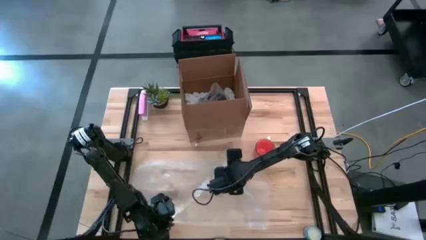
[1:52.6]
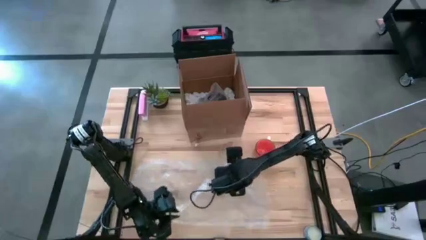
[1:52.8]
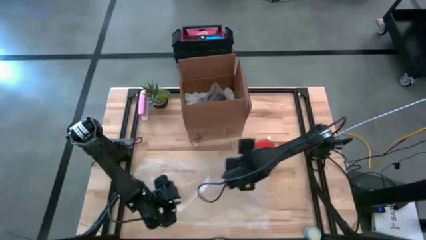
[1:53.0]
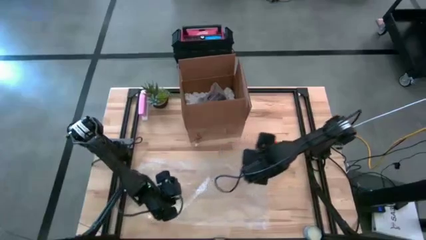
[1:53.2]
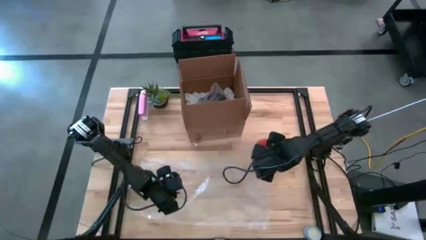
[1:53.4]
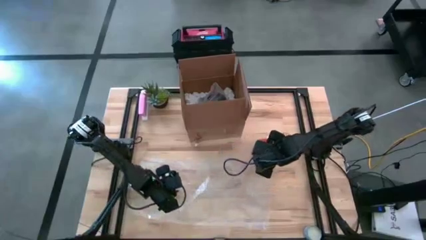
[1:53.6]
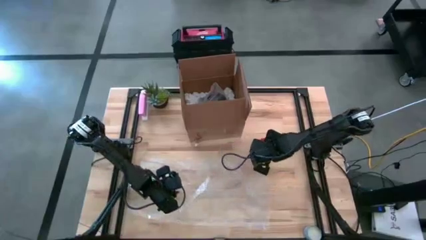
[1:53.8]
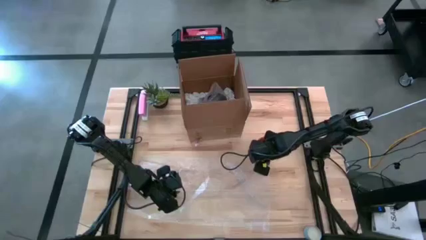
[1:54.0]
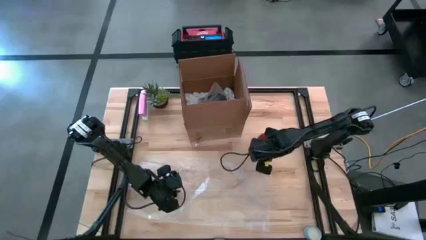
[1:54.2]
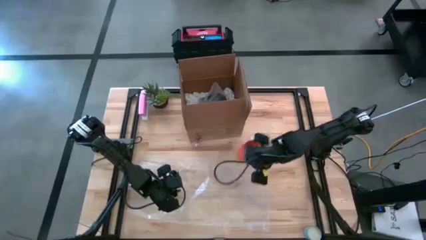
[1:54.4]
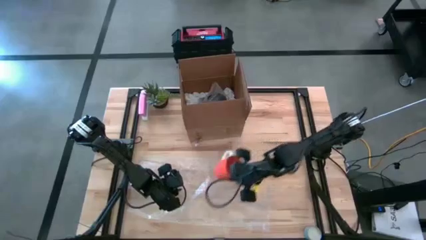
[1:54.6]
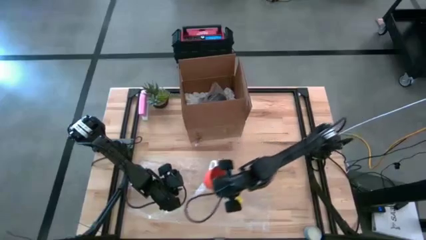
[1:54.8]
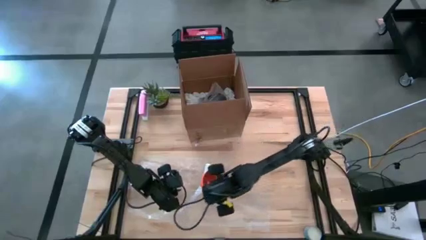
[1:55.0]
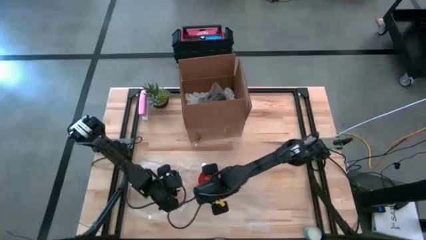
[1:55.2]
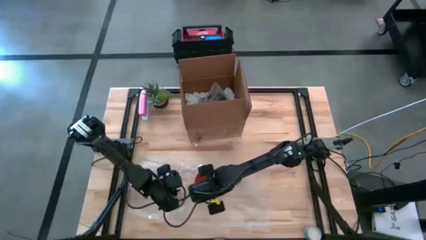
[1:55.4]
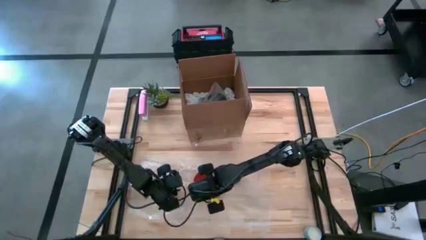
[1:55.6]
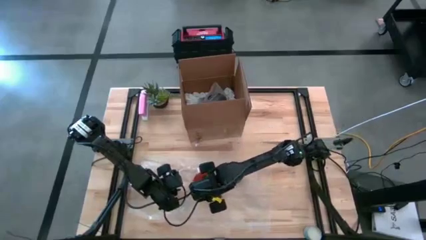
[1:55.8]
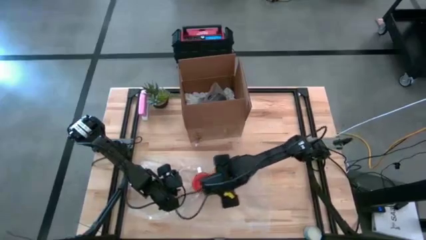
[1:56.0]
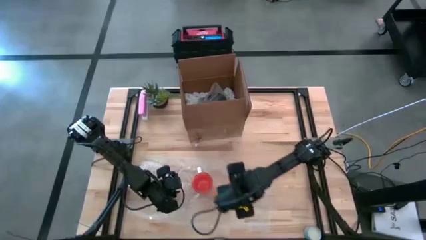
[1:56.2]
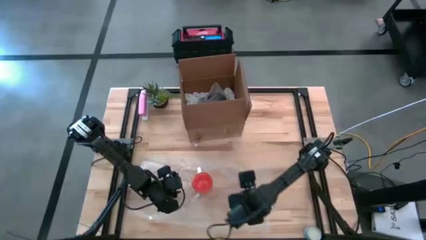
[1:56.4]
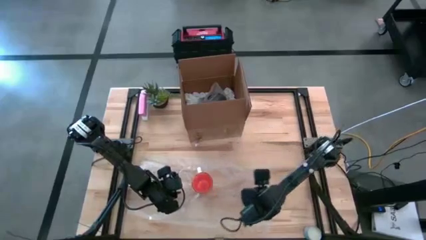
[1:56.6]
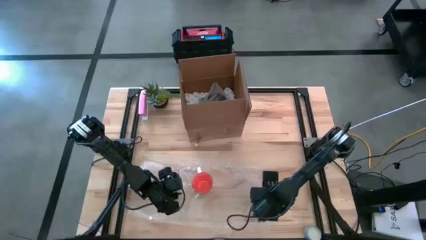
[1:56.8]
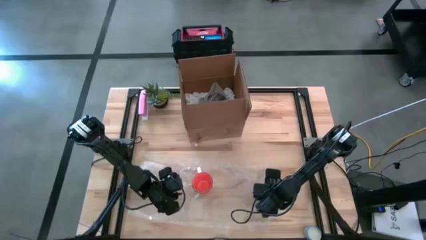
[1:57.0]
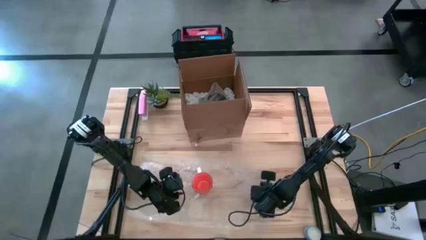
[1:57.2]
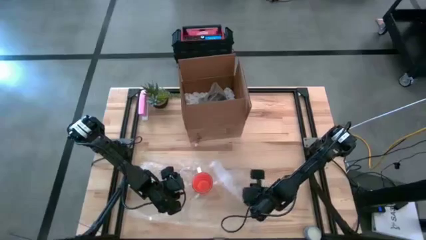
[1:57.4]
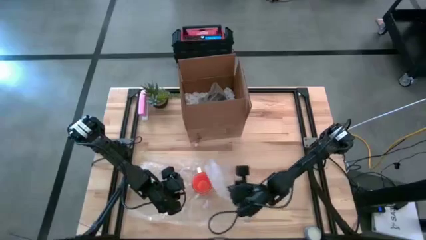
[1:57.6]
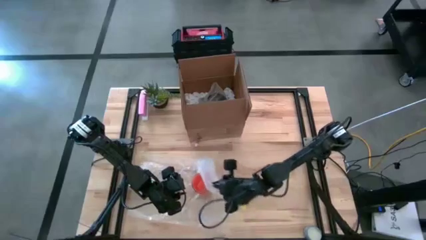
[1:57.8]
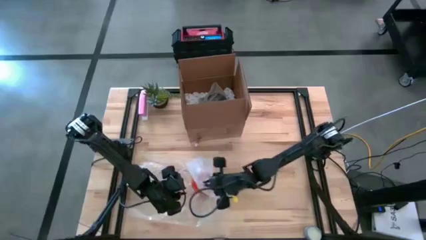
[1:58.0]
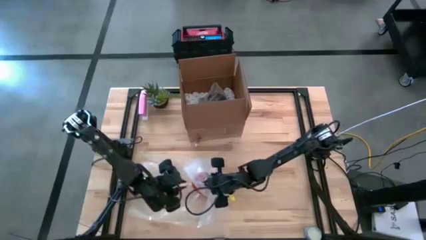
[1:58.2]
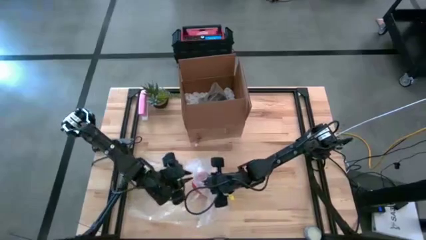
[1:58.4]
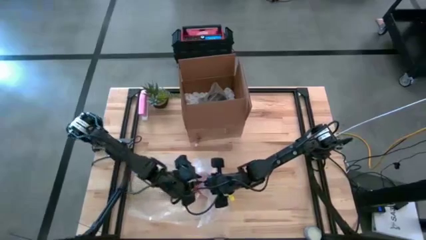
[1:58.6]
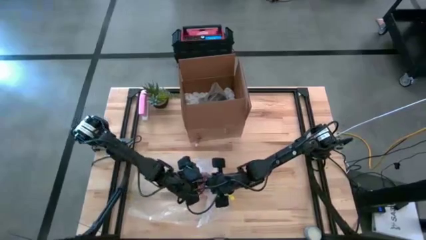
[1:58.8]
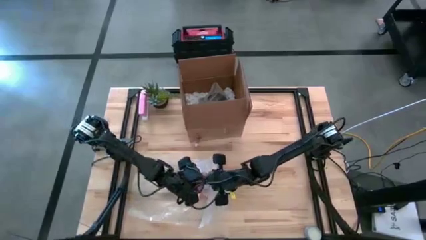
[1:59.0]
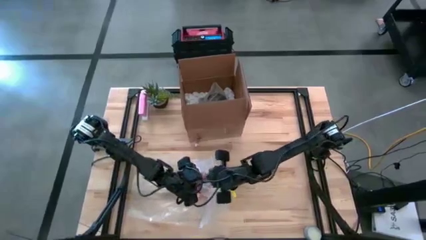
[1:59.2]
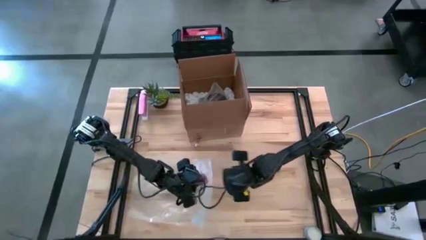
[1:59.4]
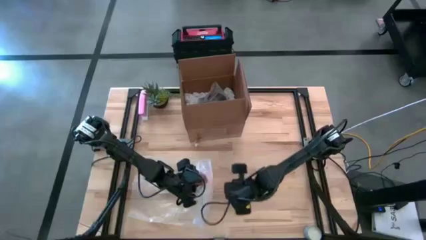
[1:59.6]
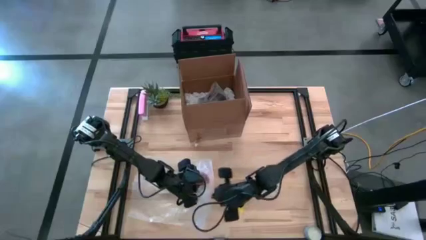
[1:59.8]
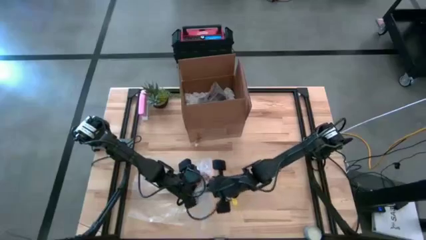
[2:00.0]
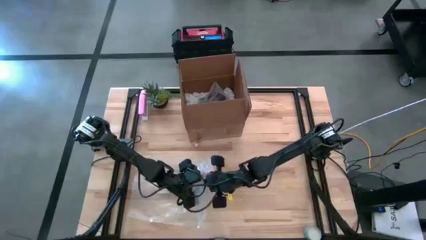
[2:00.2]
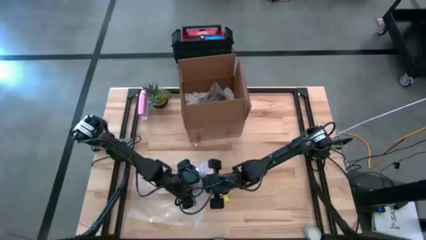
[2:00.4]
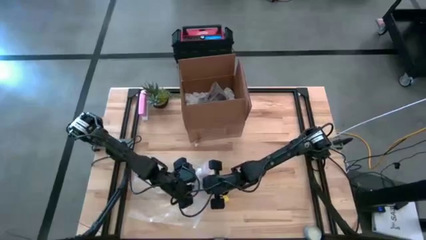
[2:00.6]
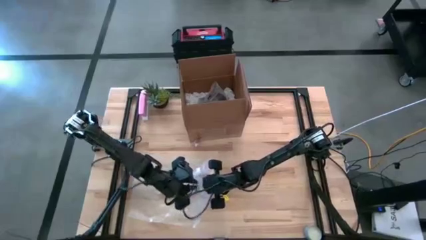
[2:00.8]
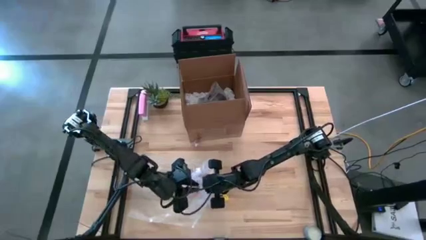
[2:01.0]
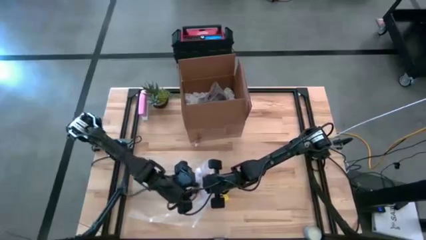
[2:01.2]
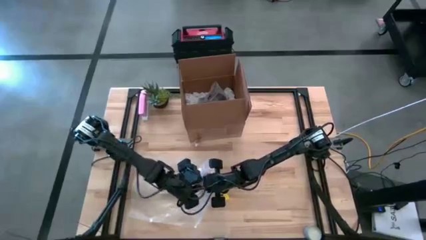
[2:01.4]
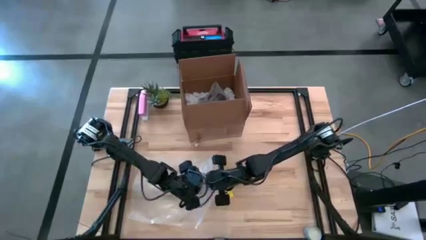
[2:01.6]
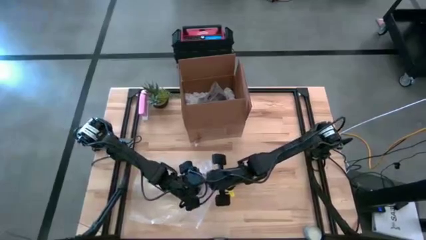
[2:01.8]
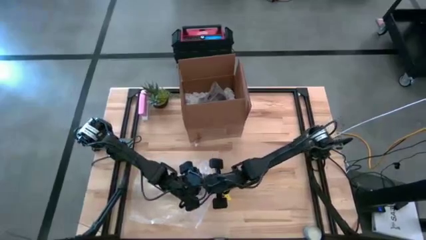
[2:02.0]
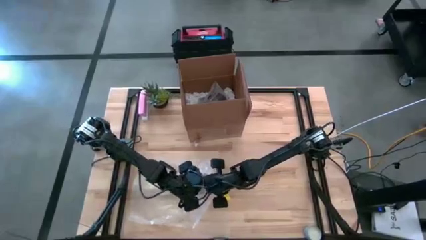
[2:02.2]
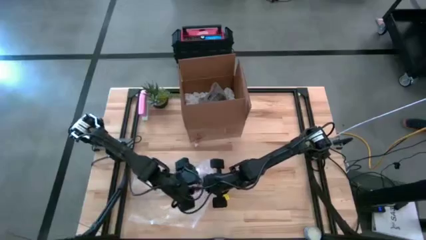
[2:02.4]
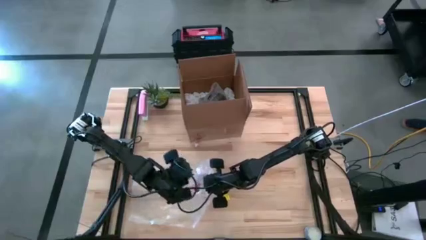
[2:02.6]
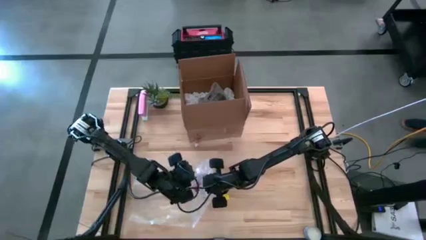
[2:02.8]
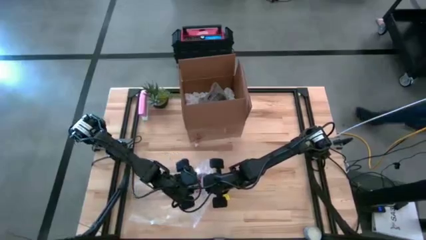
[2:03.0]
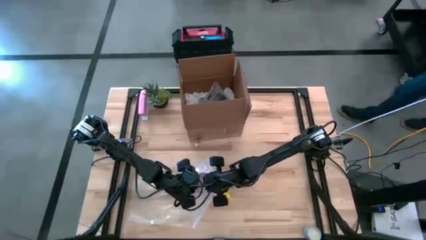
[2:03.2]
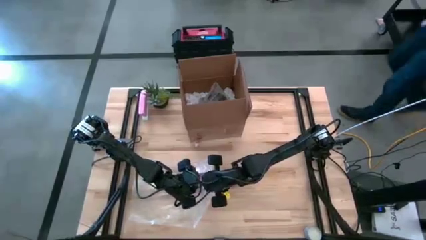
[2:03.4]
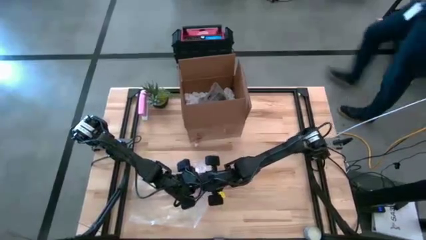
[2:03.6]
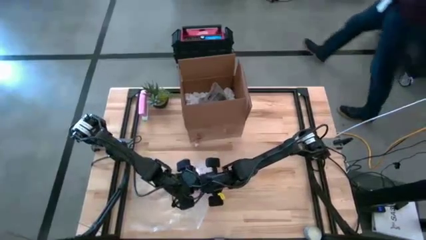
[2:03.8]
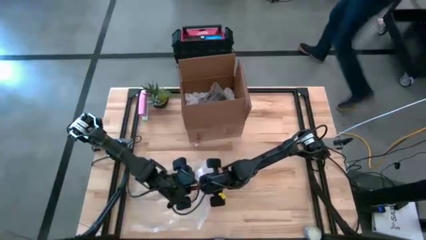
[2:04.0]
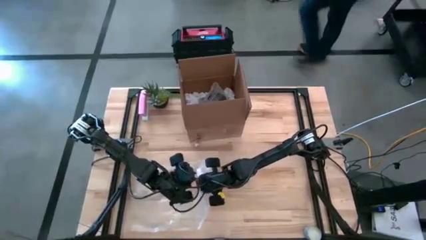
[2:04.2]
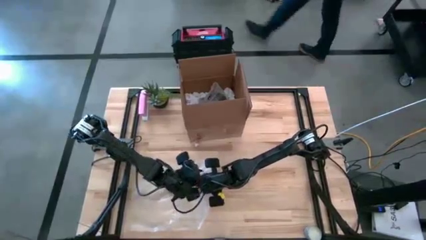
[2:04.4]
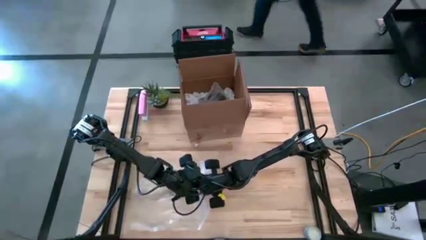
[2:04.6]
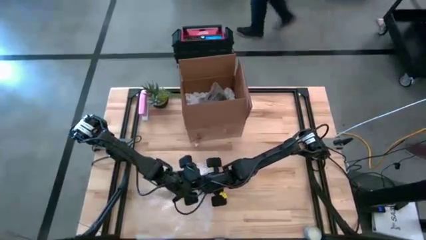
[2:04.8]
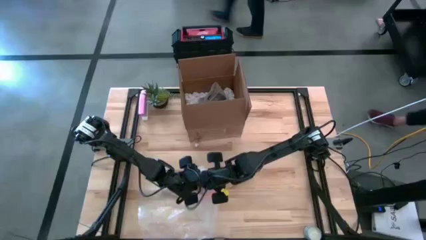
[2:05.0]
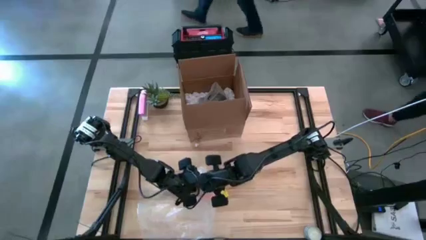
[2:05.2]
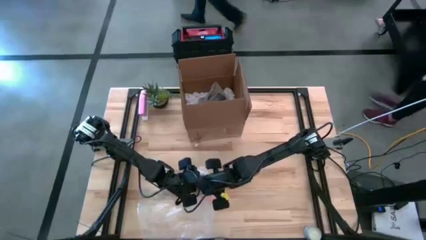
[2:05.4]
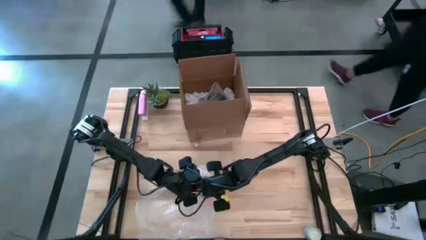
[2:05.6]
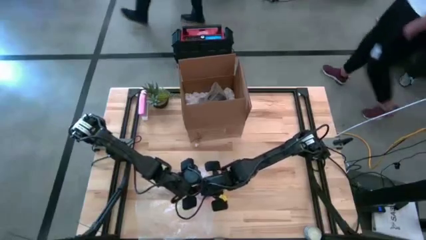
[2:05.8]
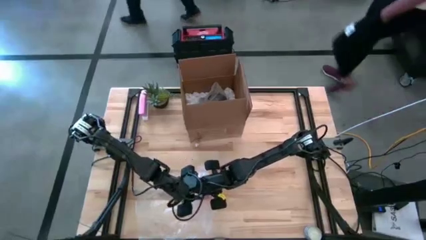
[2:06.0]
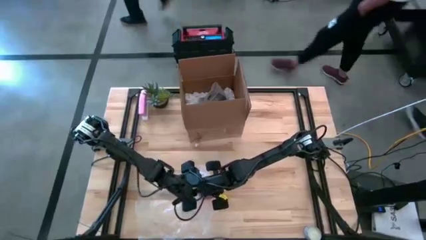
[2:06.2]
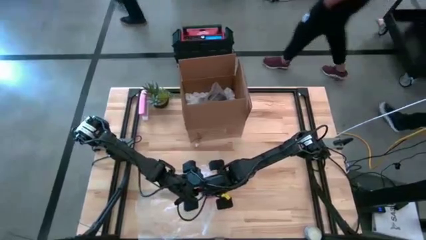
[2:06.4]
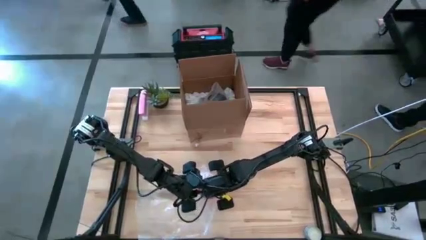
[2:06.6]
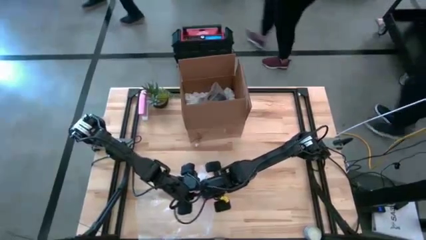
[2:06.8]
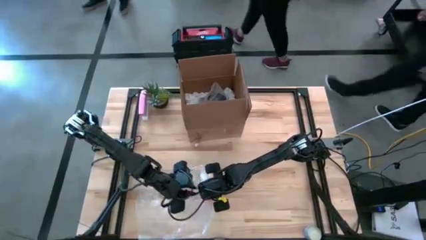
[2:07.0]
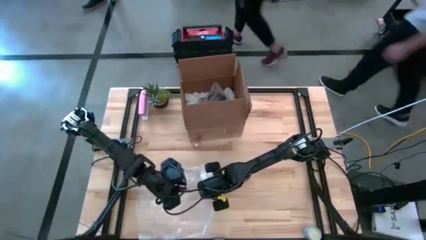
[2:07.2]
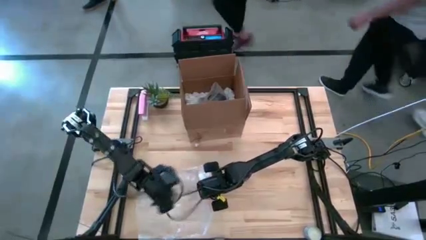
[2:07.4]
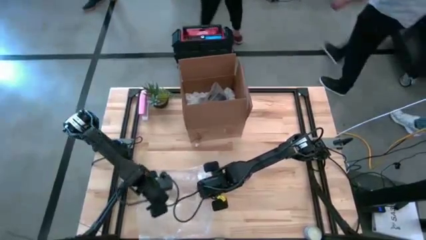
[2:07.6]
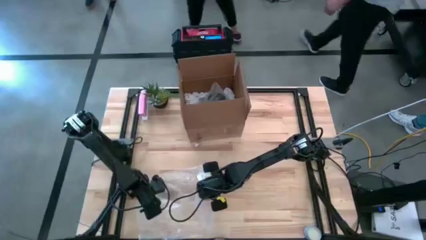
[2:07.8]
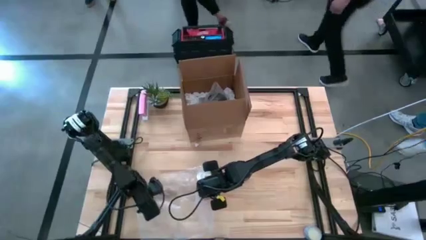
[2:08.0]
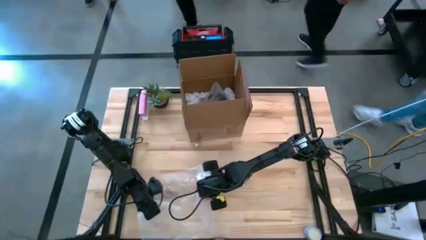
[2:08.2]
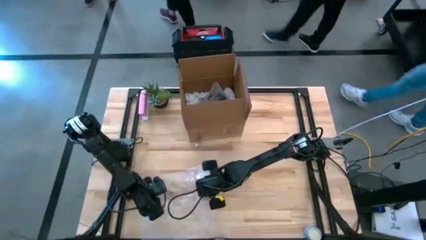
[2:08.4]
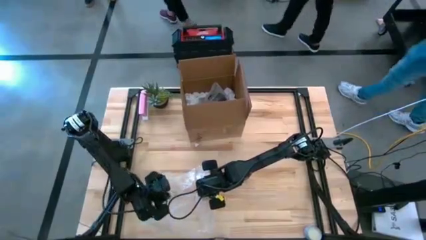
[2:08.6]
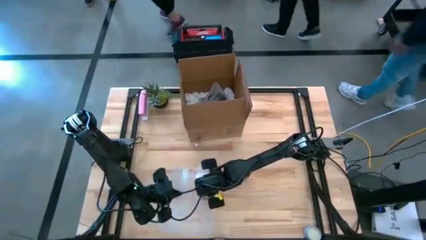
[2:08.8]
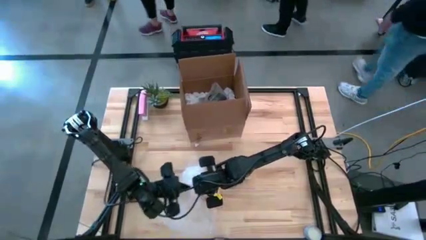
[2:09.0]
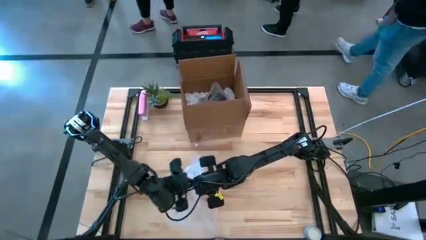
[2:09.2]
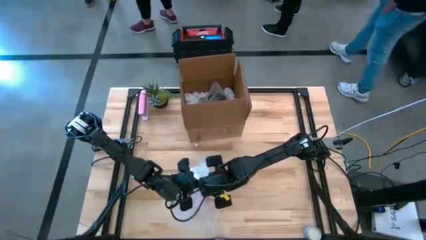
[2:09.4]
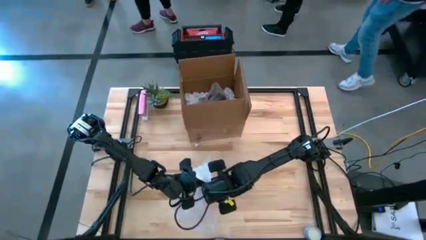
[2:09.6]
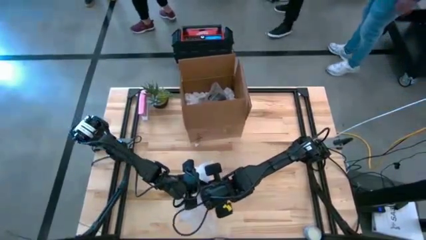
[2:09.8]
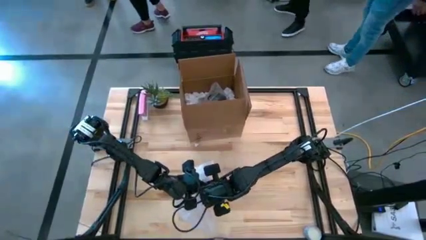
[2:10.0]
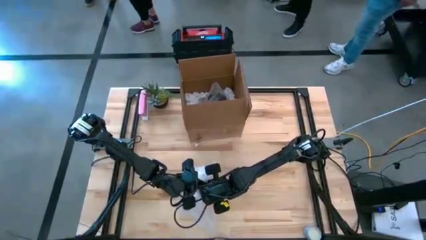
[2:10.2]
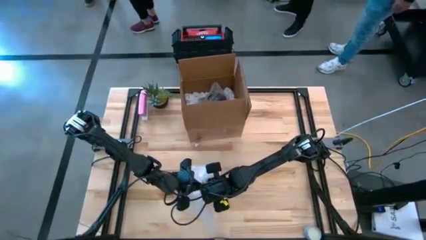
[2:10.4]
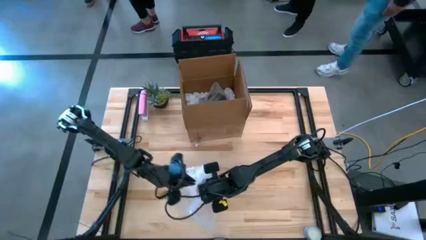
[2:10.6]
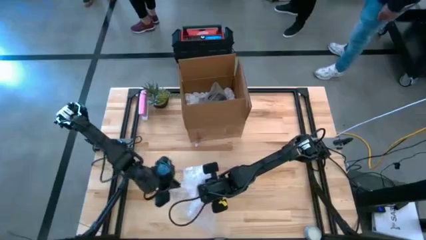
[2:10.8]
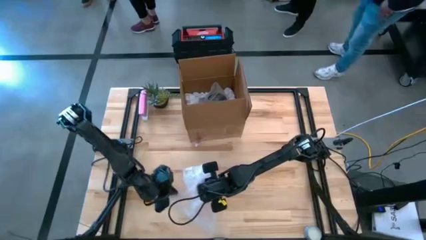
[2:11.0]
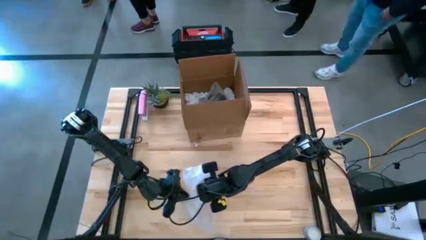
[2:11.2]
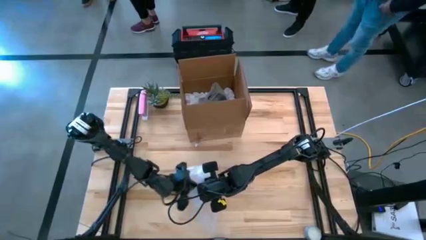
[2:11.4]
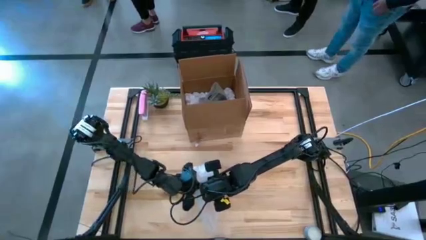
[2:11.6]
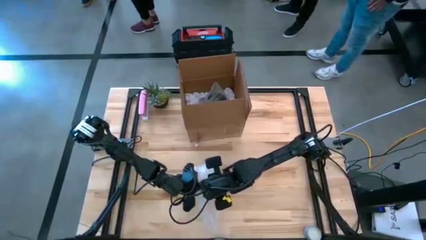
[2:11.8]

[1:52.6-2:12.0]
Task: wrap mug
Wrap the orange mug with transparent bubble wrap
